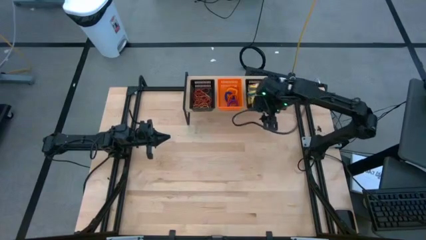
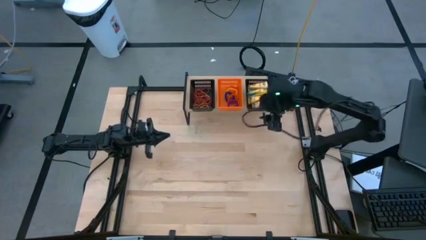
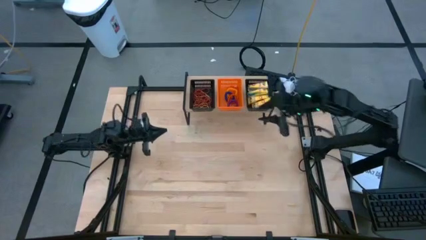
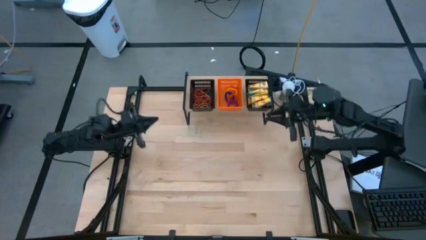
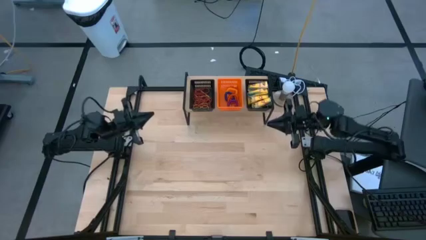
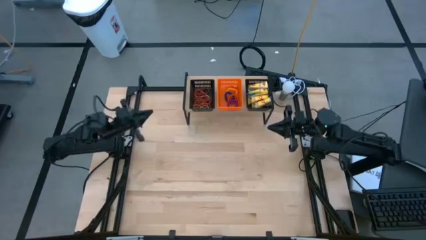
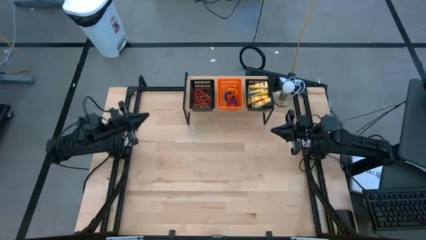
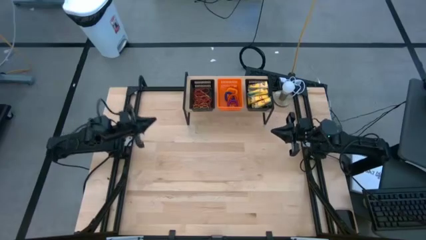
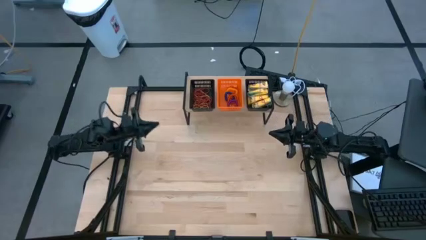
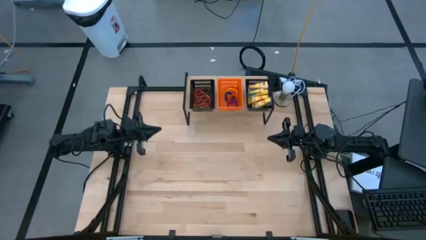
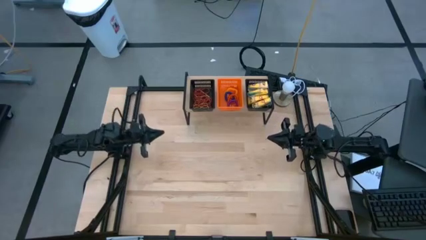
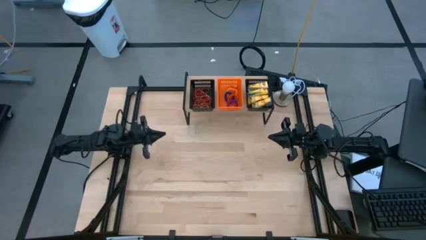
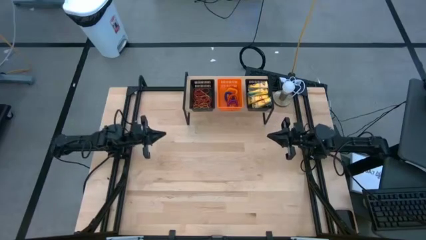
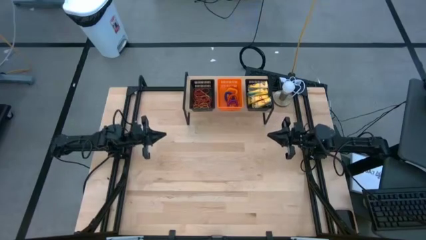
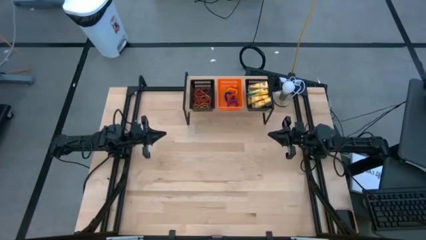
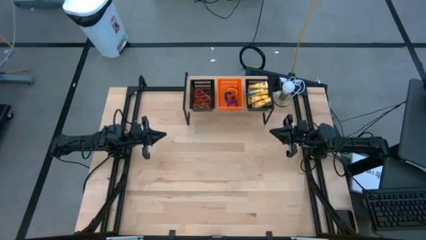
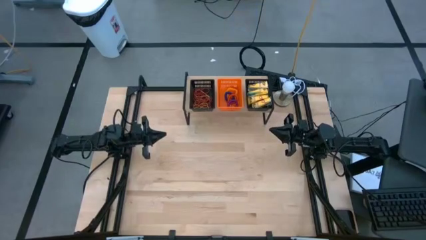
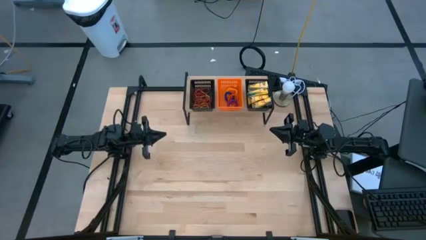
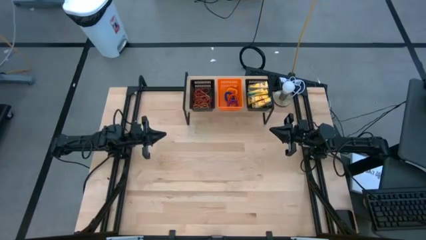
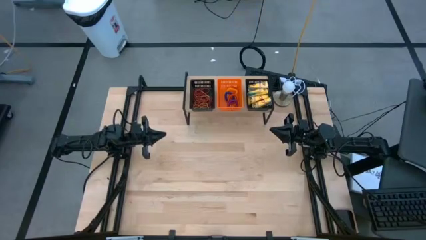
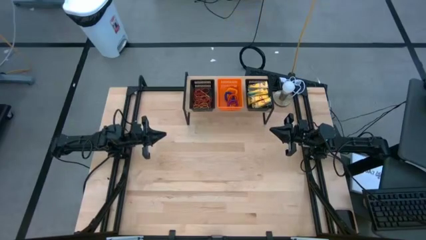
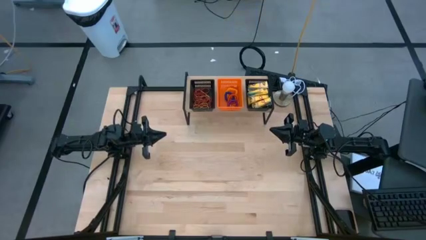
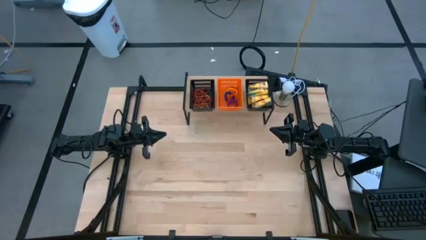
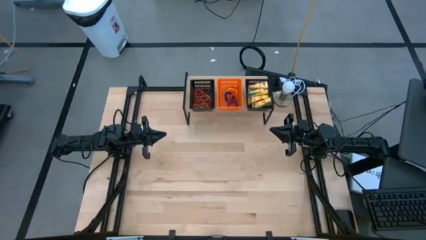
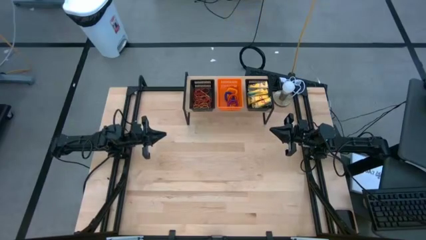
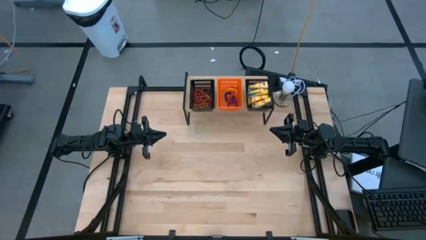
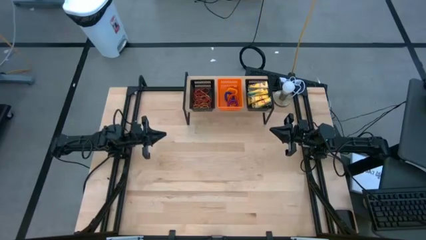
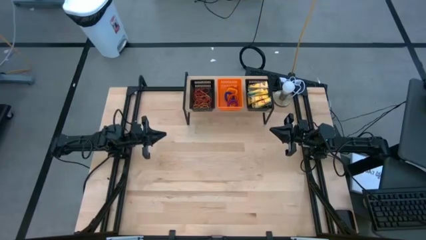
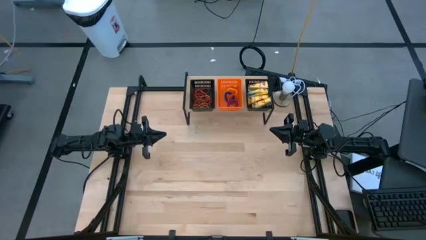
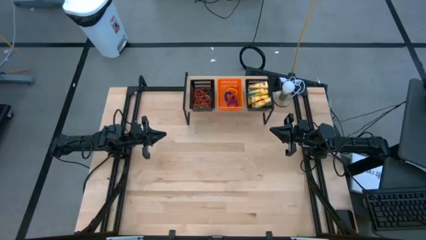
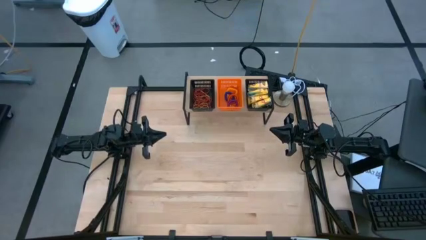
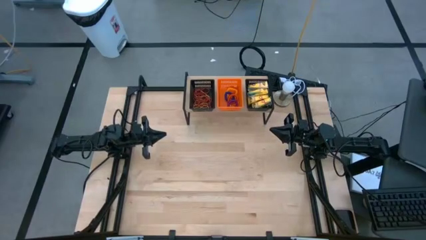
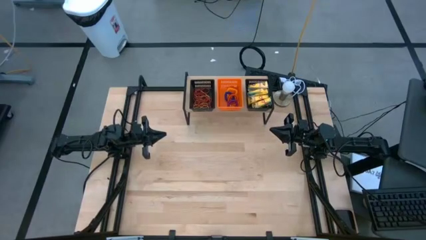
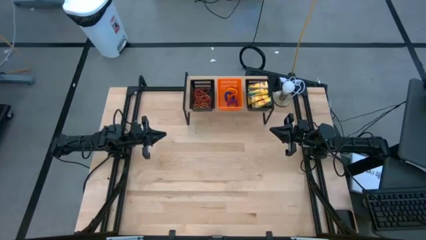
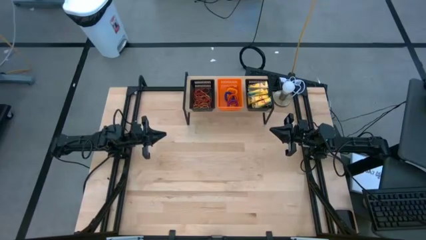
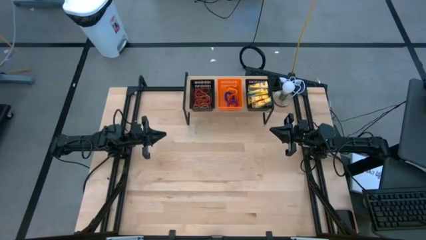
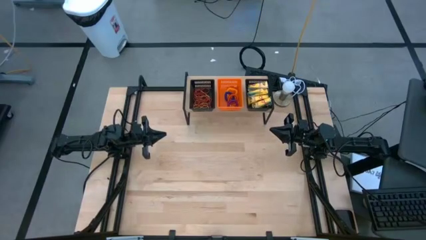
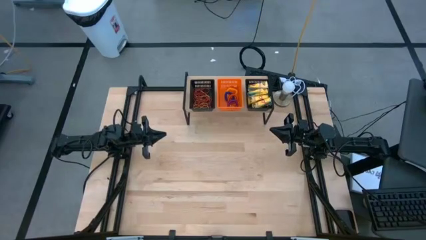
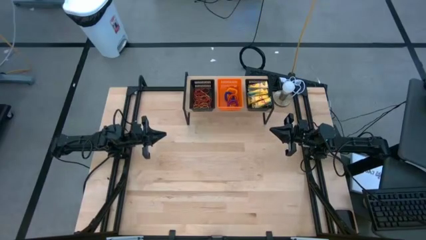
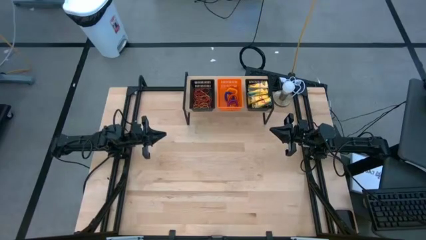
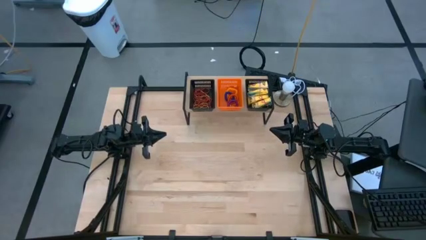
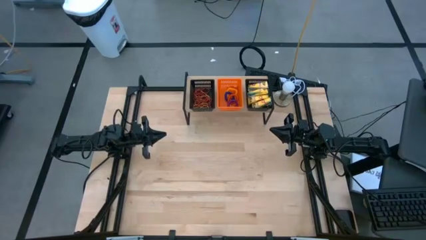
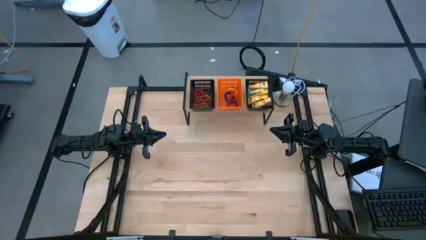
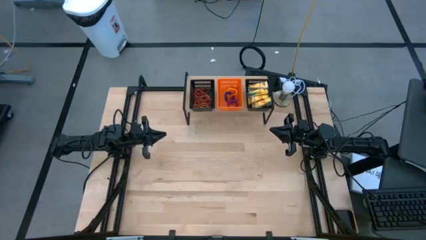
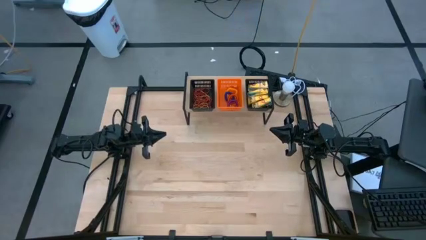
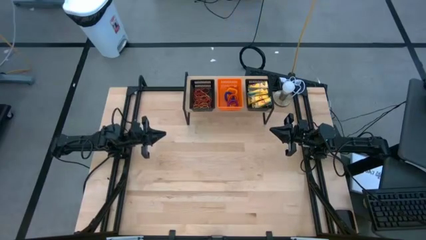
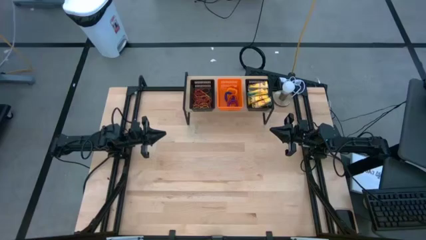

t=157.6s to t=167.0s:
Task: Pick & Place Office Desk Supplies
Return to Home Position

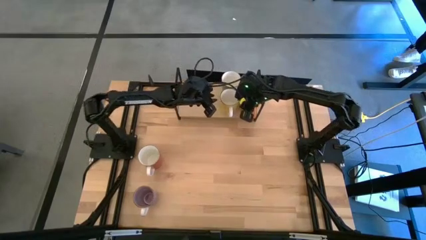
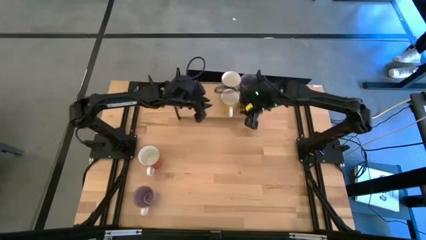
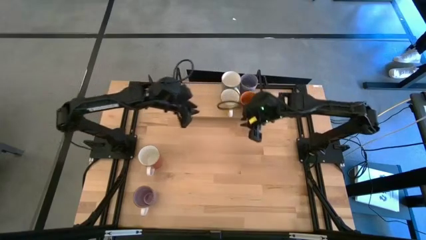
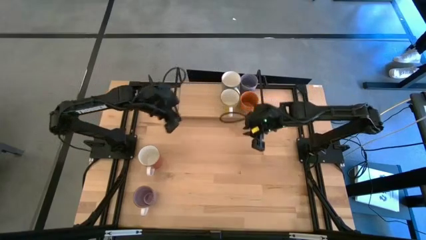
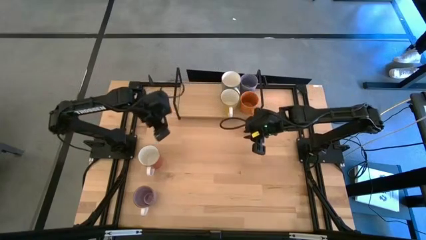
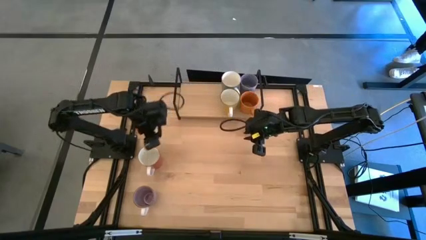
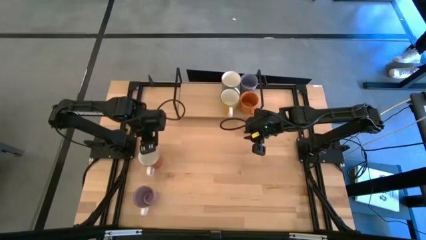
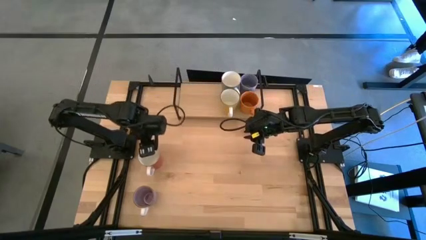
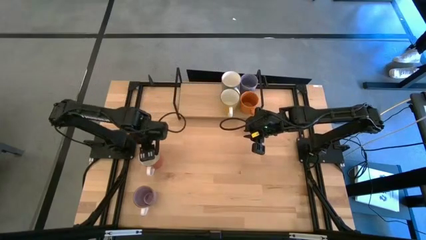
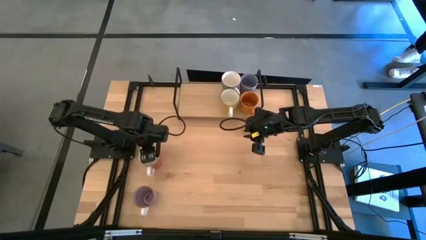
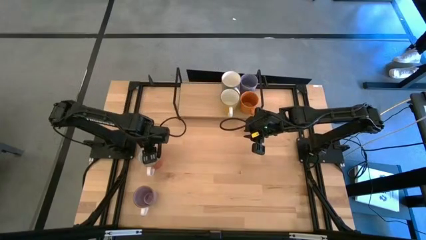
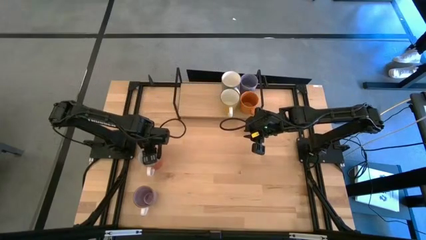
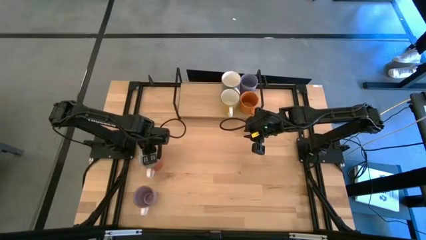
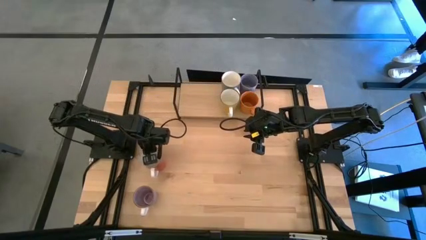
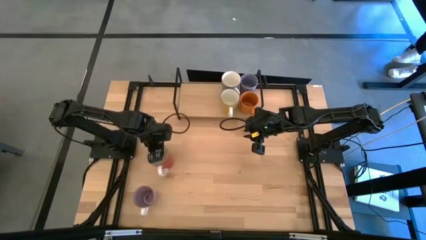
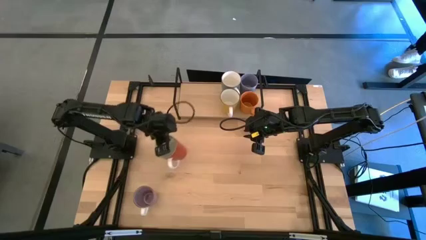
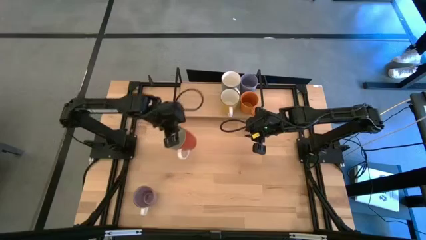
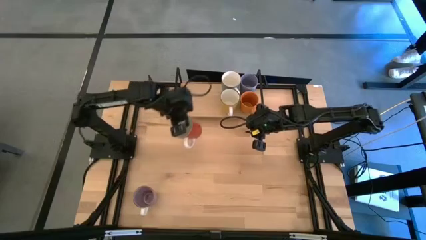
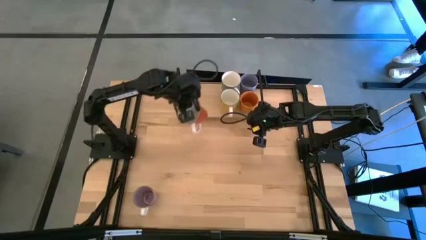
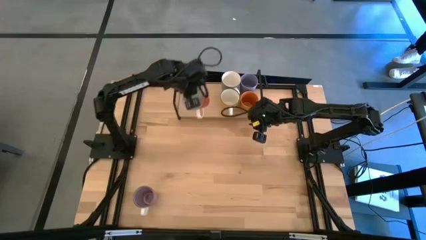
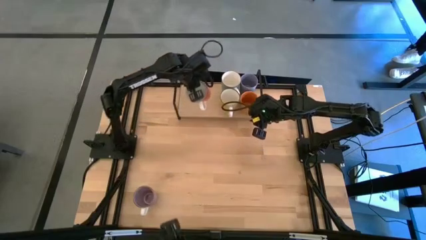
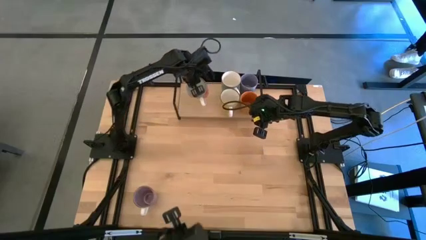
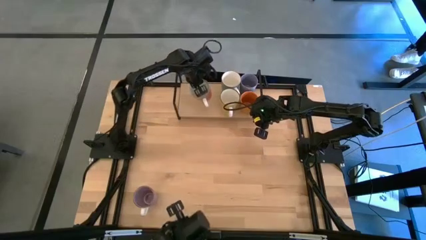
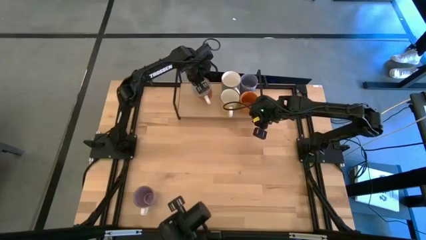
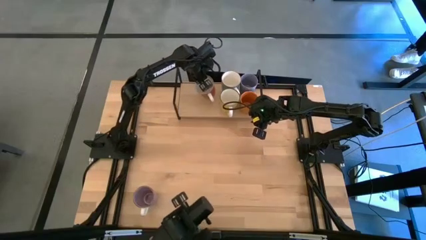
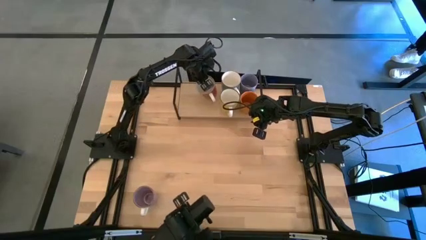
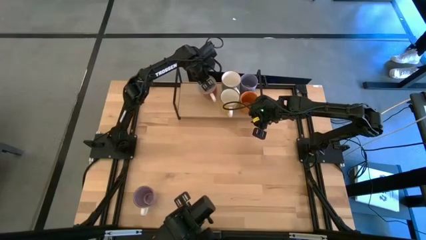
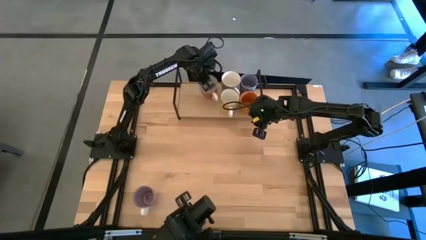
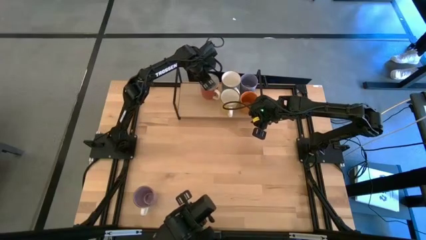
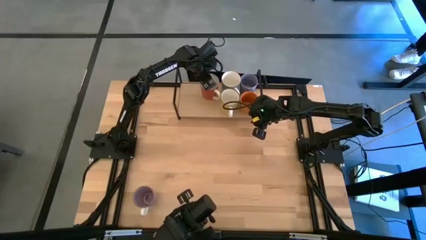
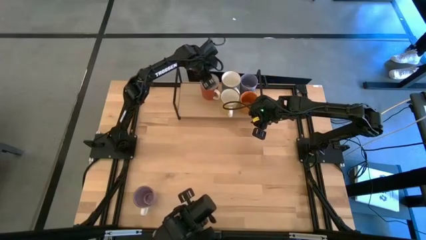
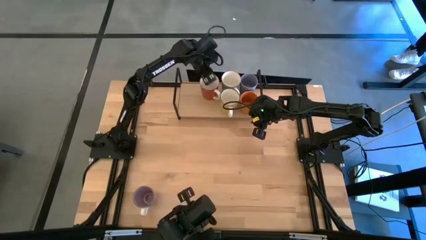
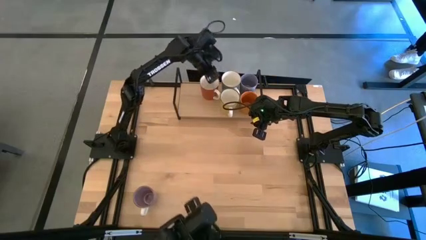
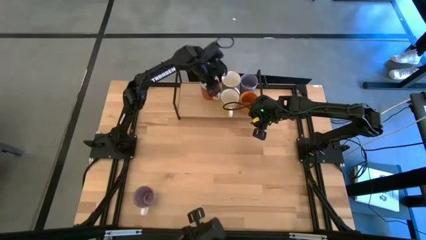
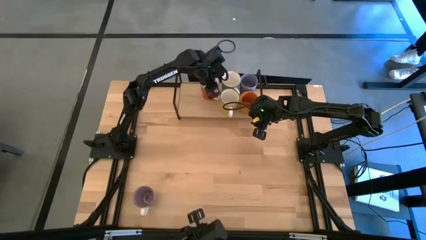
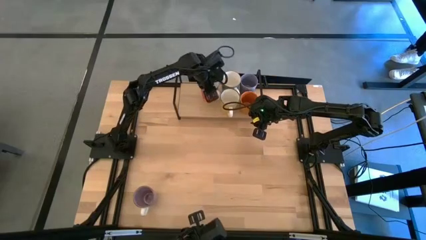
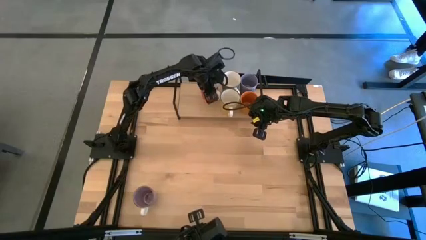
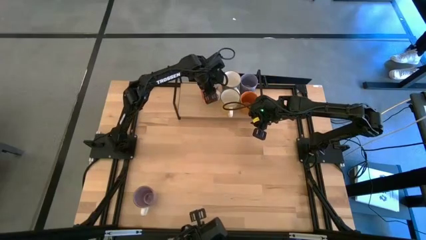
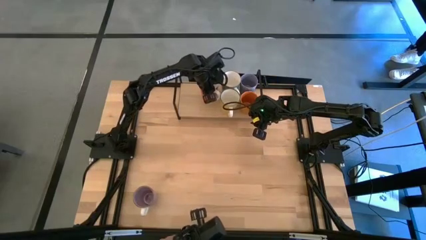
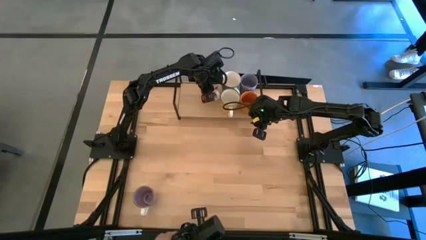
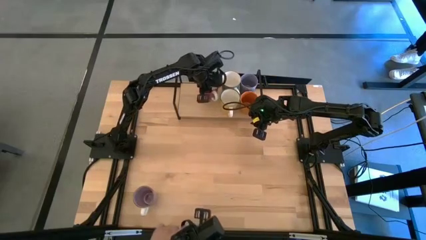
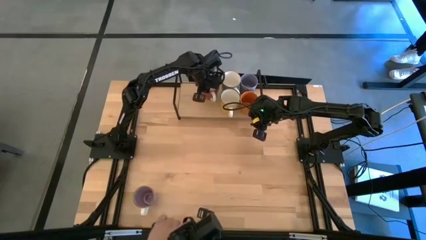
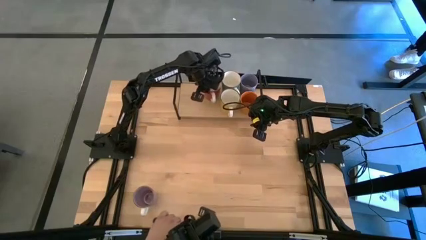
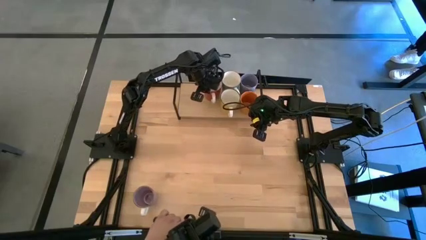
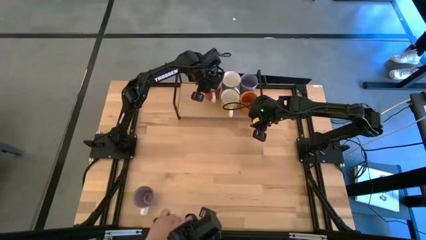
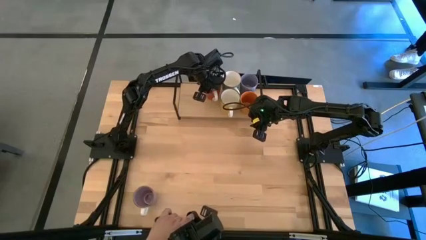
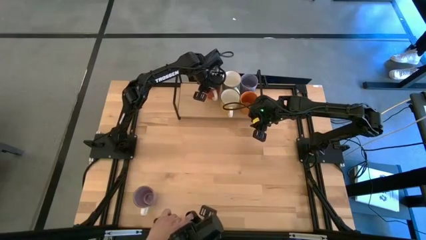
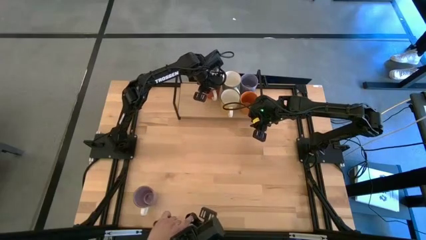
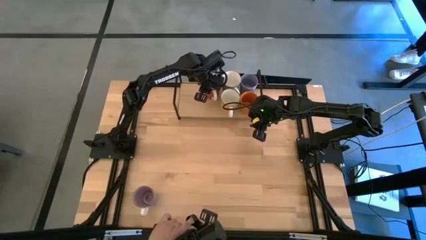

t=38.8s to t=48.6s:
Task: Place coffee mugs
Put the orange mug on the shelf
